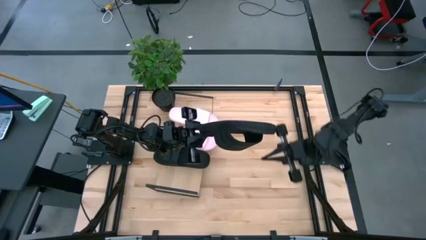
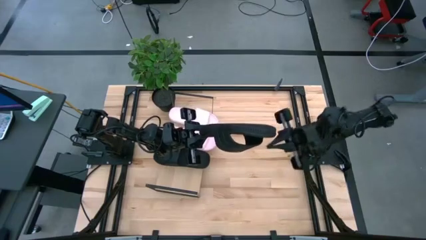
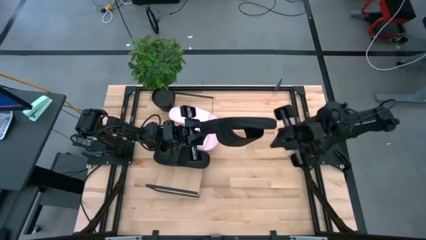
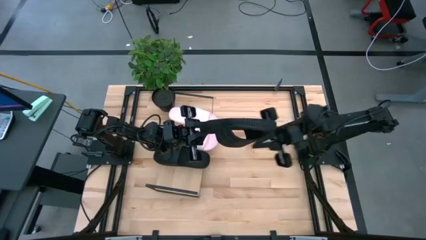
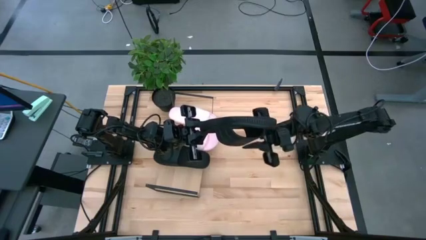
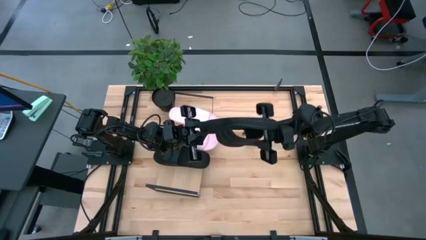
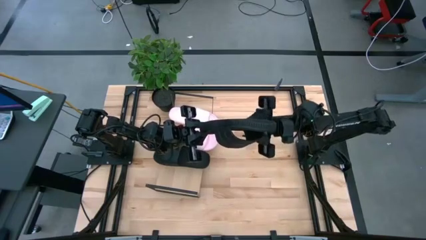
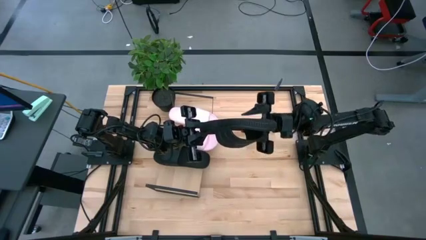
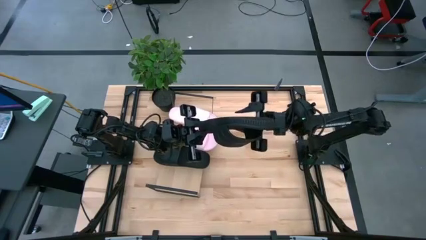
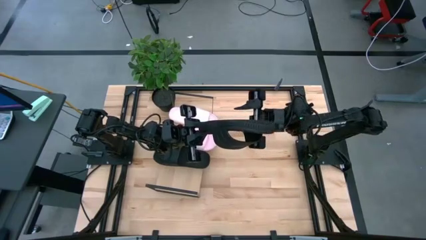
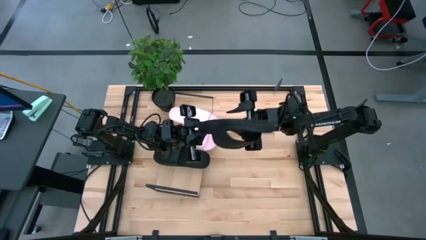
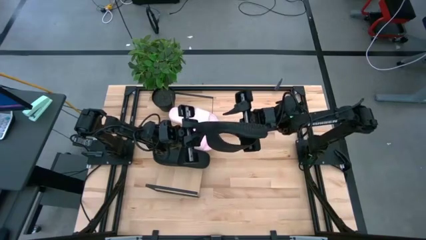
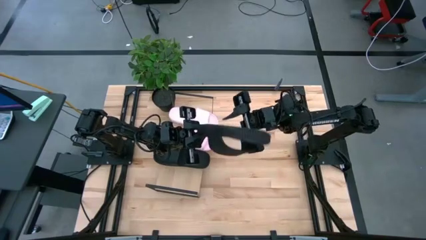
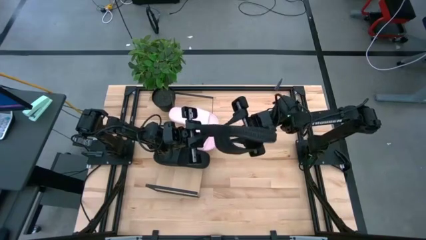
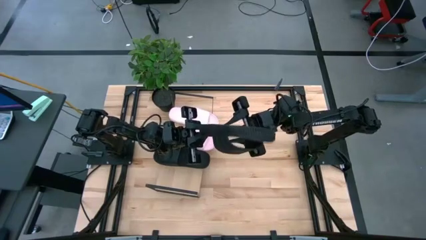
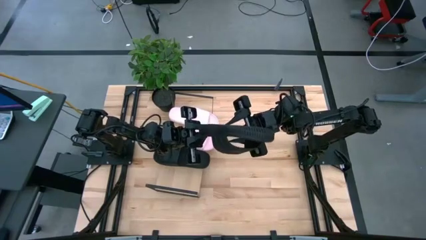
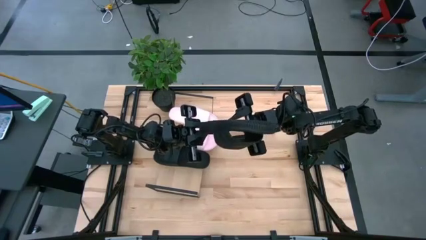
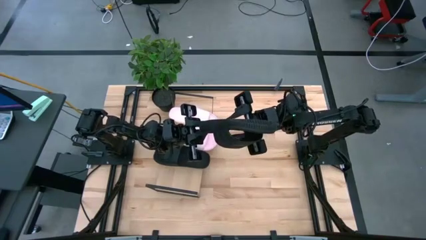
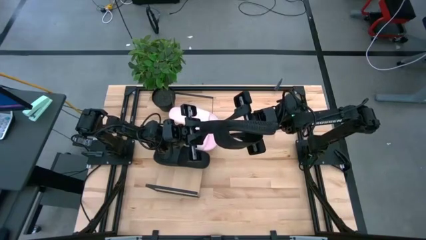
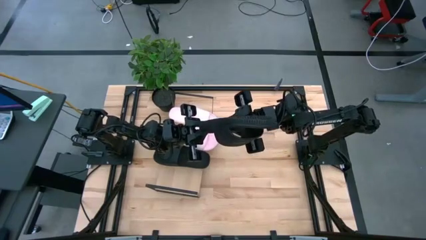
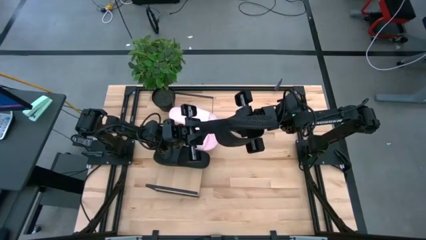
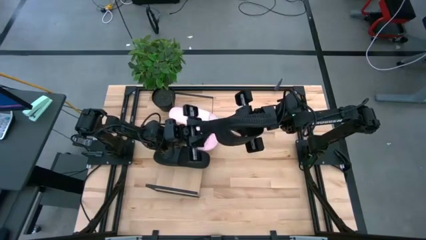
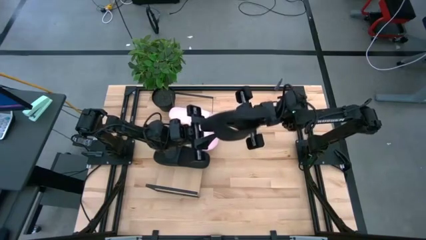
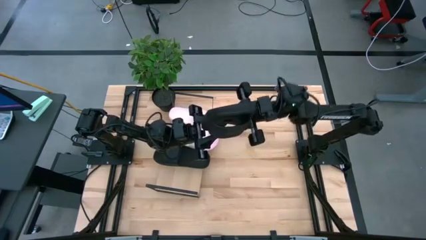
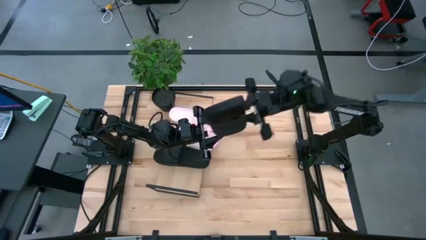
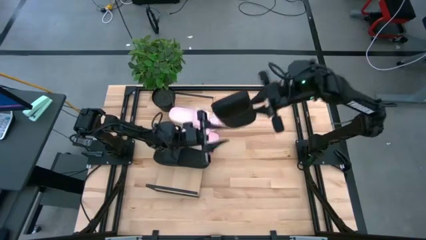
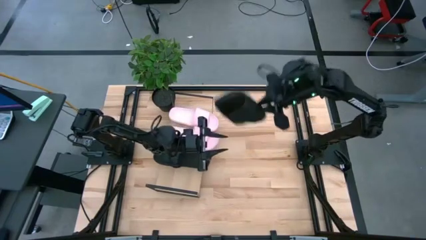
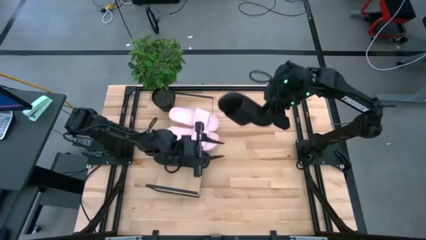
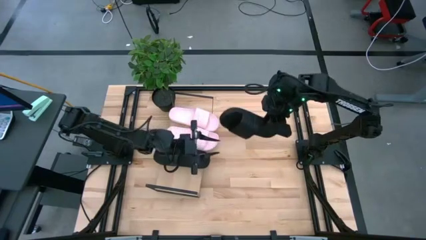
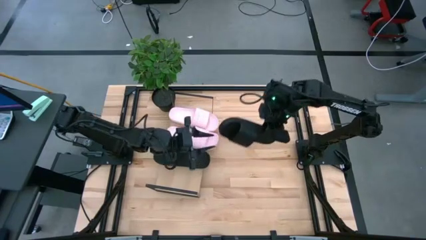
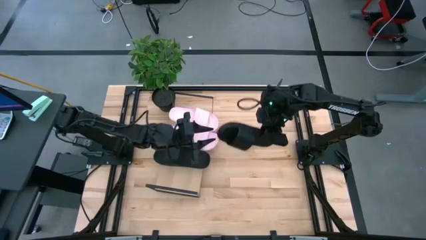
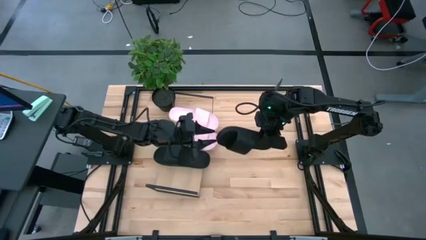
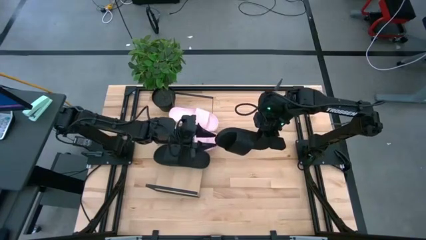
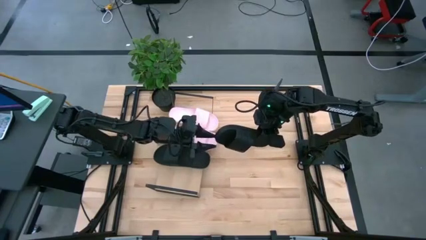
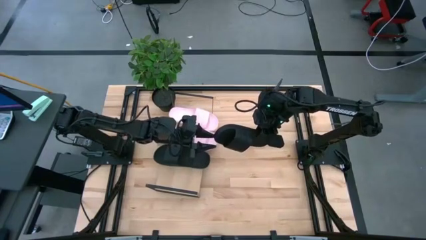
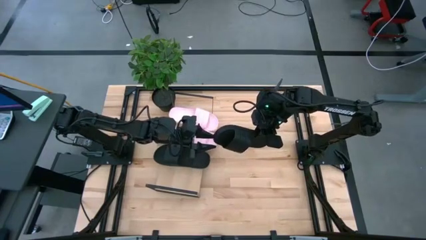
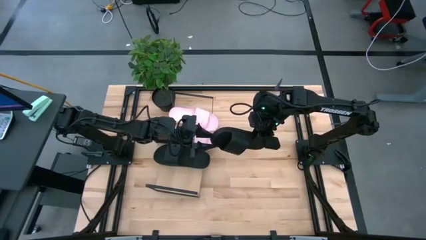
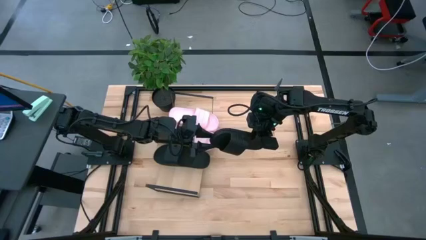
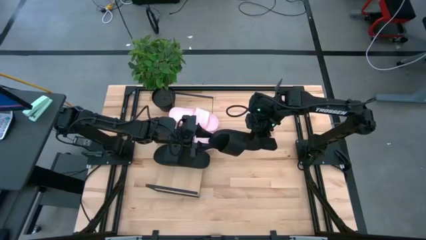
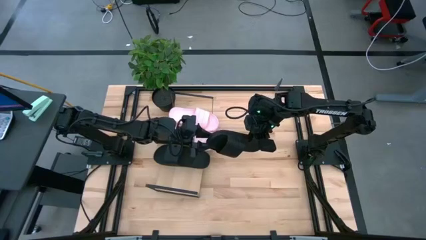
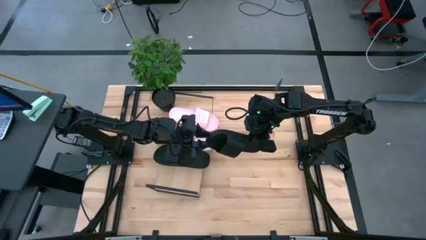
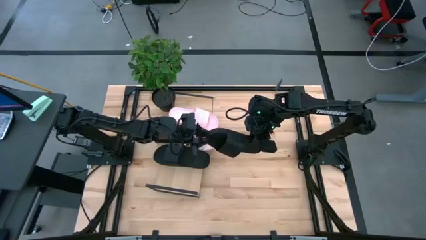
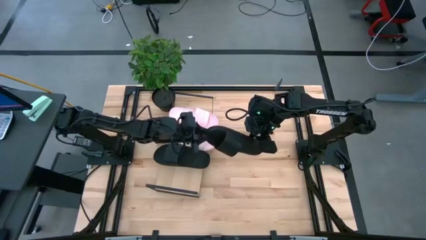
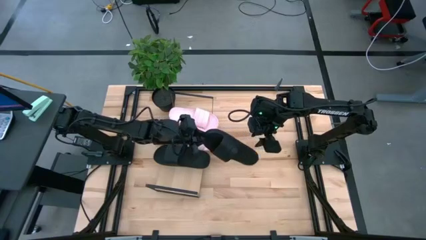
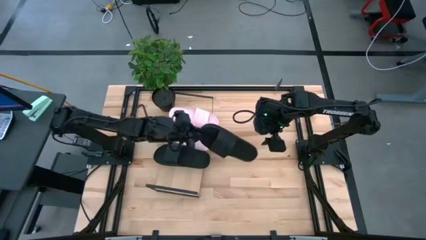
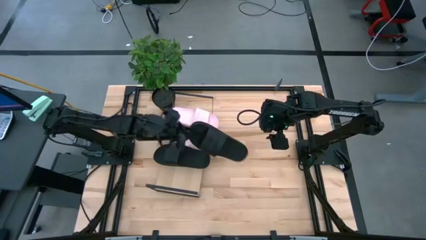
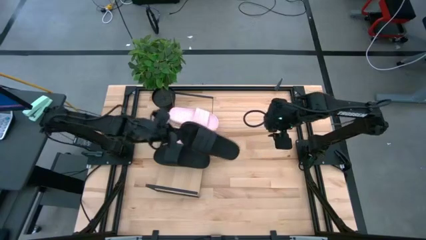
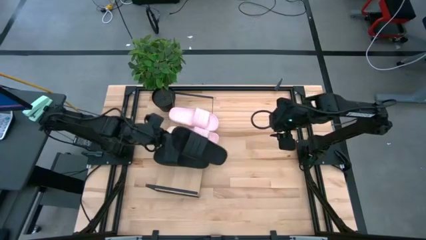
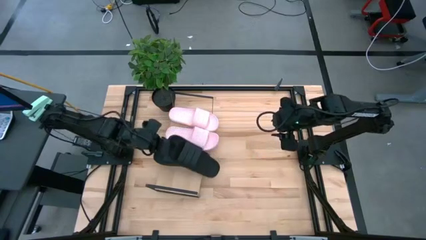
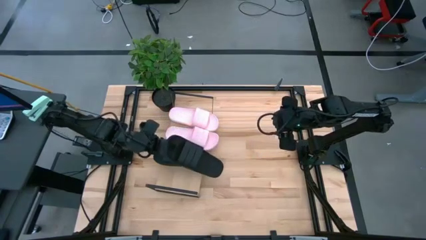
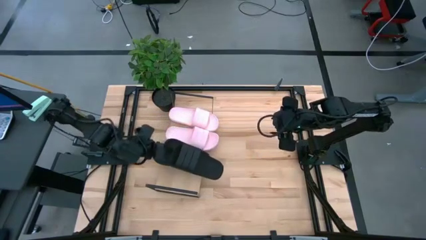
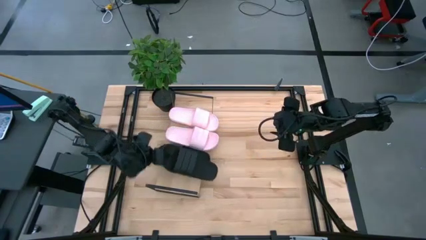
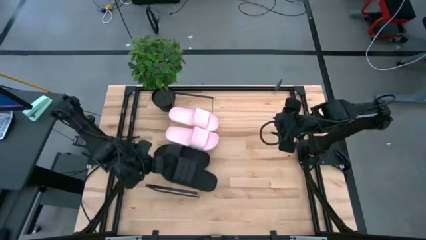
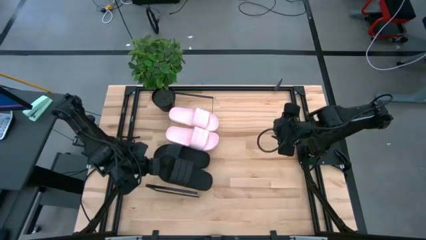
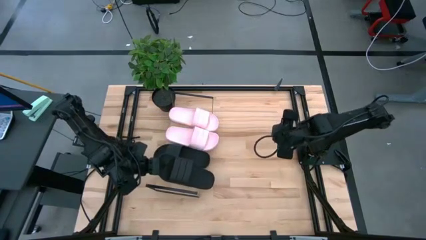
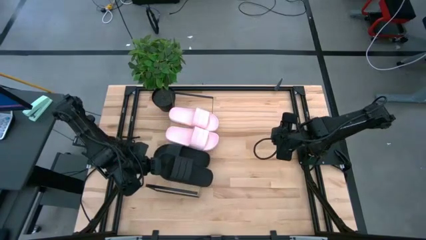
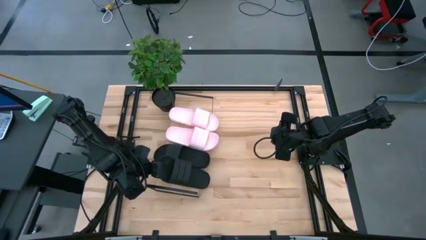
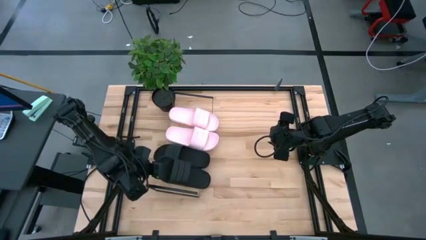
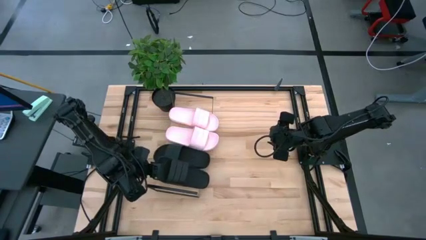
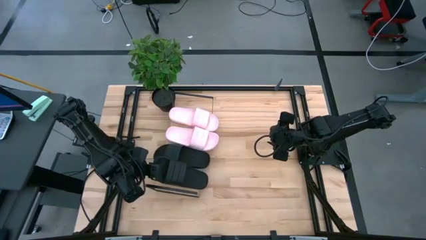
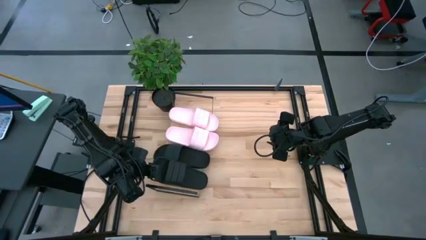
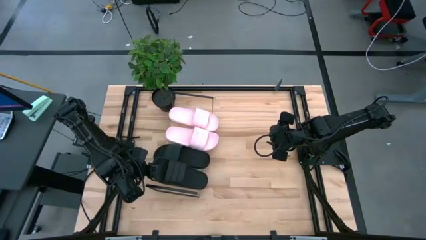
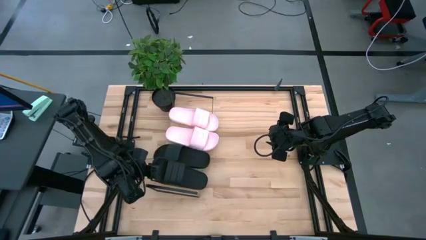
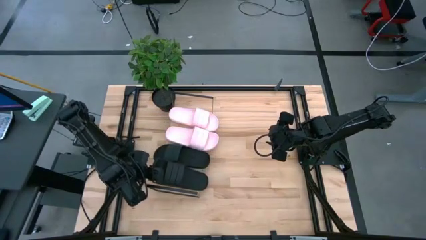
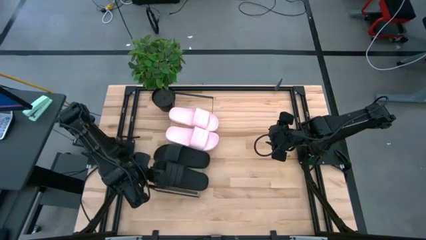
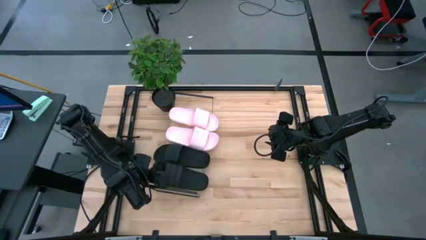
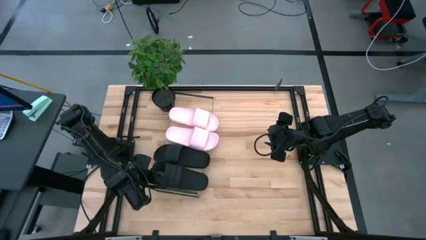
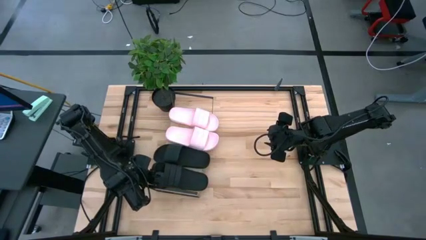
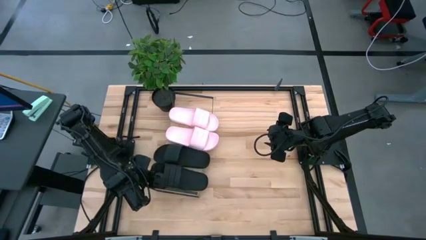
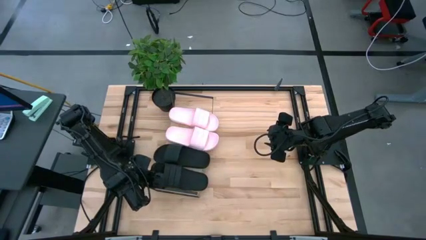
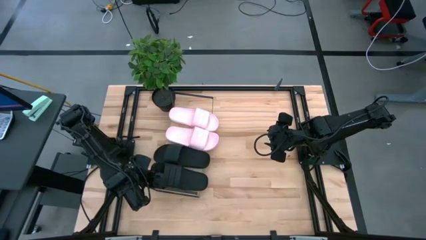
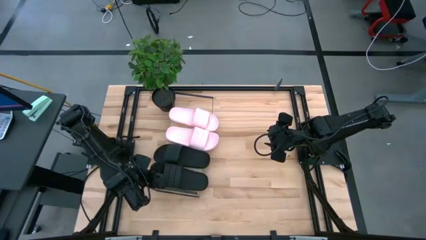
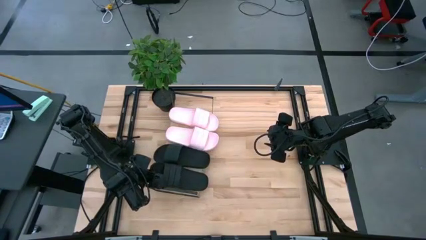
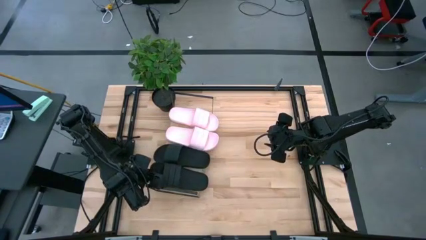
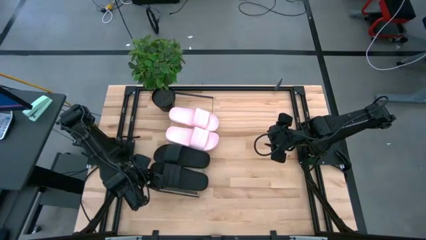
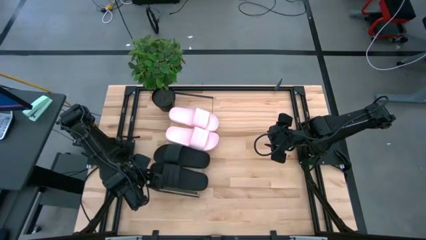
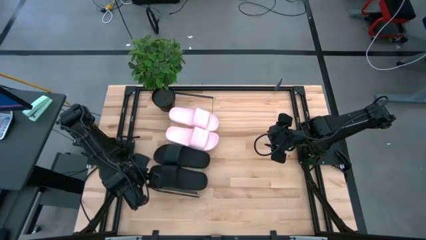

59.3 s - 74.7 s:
Task: Pick and place slides into the shelf
Put the black slipper on the shelf
